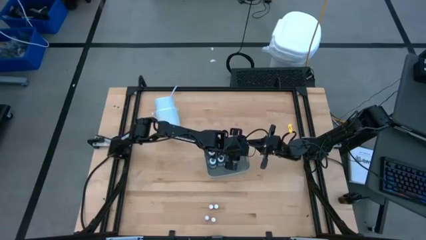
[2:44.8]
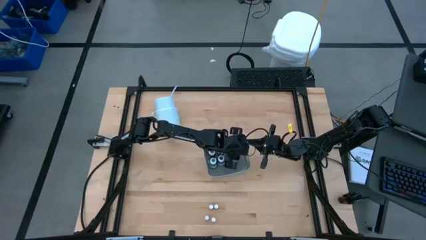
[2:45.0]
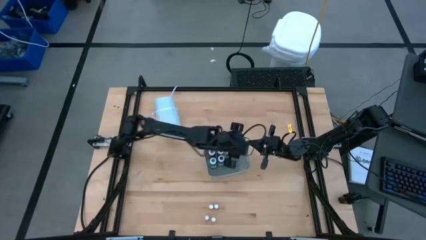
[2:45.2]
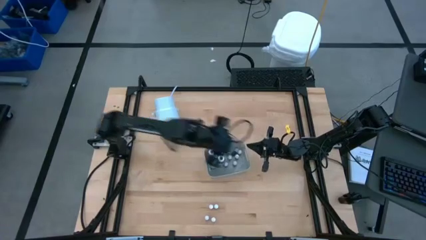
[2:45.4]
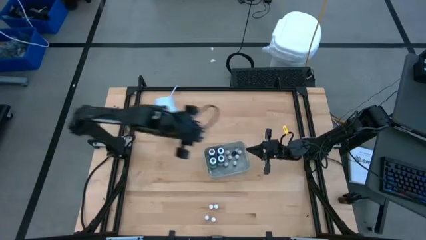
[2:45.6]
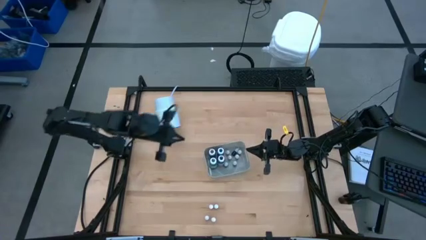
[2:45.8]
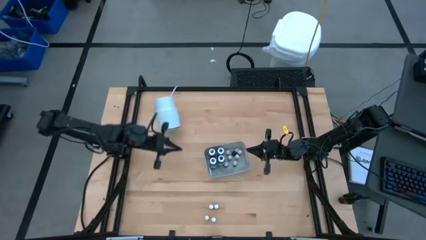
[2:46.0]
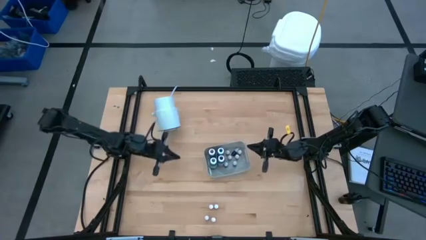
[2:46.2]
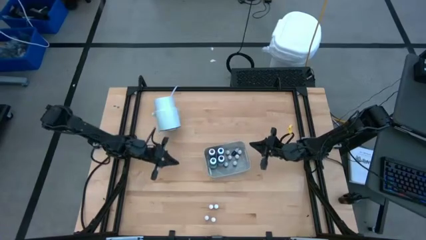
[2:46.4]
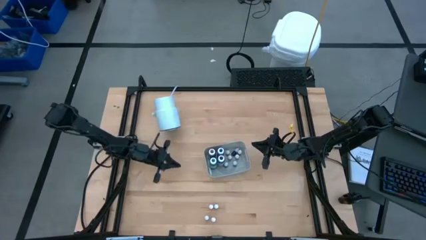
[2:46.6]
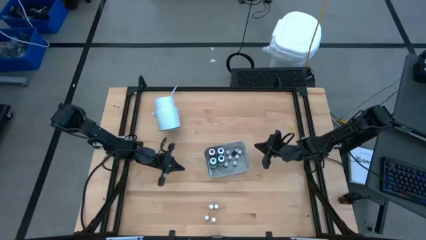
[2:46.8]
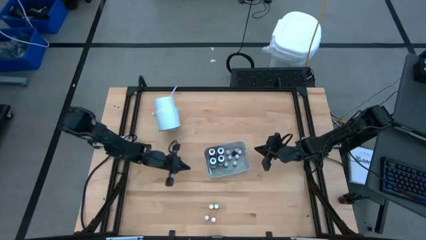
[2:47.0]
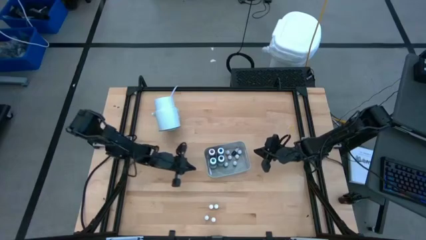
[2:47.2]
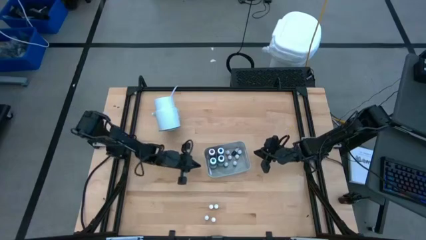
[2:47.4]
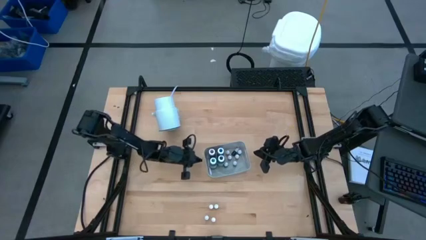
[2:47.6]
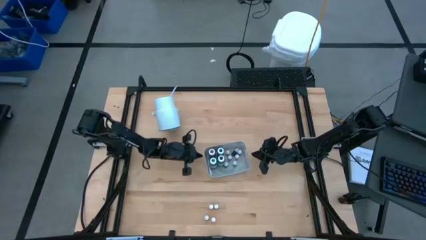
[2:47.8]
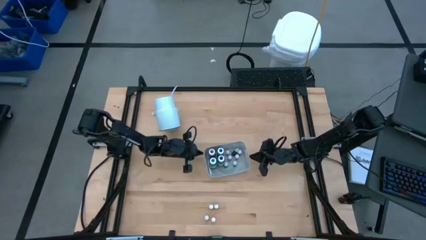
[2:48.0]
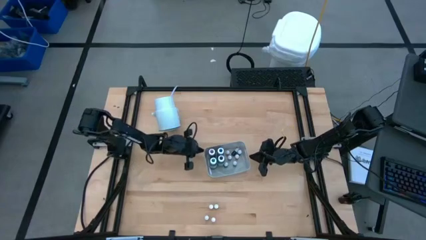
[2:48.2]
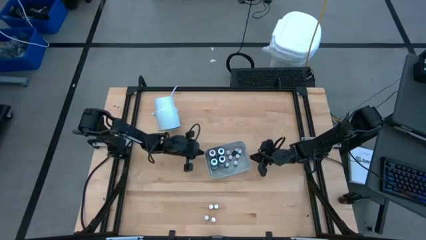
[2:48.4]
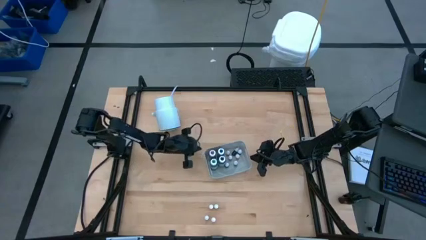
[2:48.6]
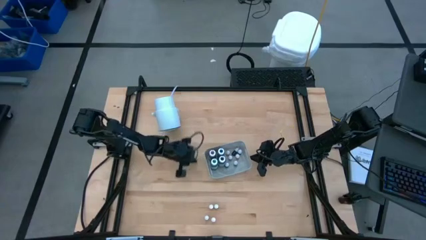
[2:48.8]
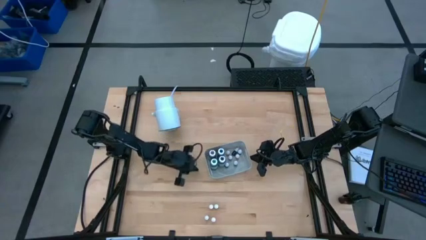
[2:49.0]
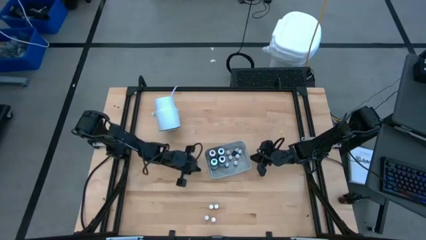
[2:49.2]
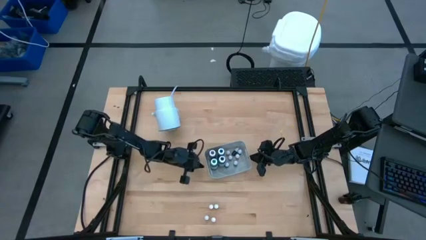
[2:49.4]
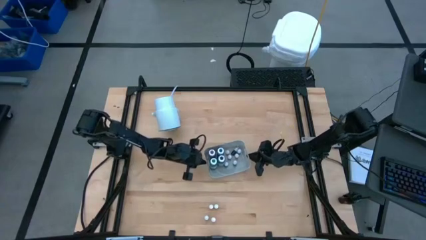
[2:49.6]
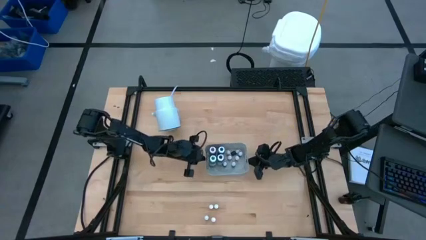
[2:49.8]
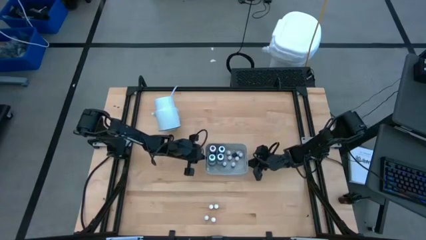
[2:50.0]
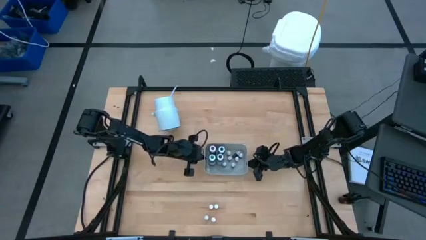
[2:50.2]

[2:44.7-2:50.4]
Task: Pick & Place food coloring
Adjust the bin on the table

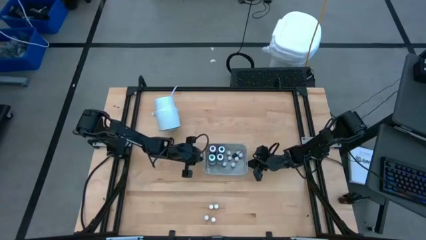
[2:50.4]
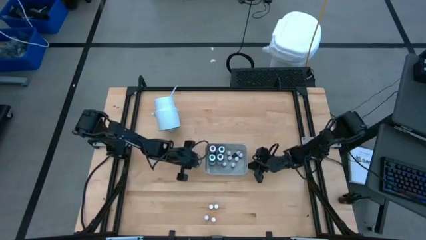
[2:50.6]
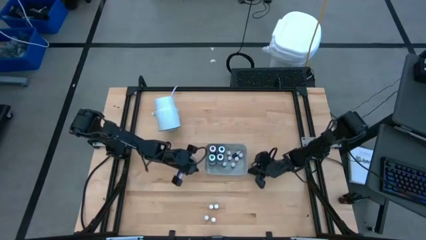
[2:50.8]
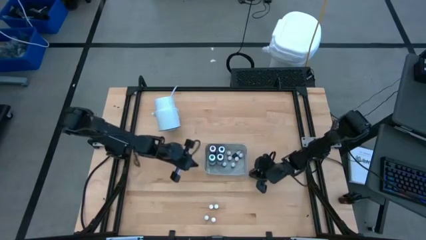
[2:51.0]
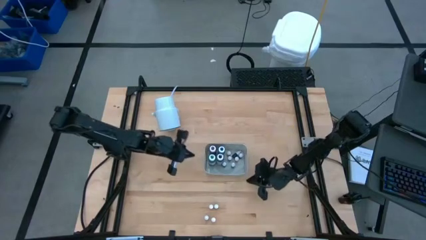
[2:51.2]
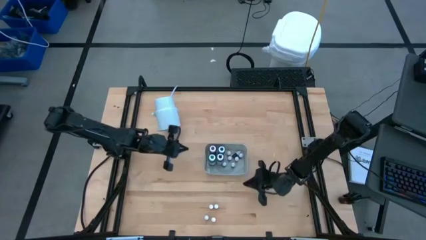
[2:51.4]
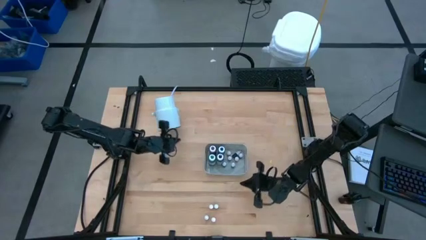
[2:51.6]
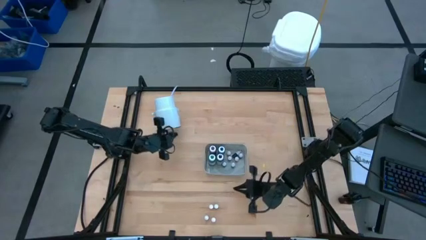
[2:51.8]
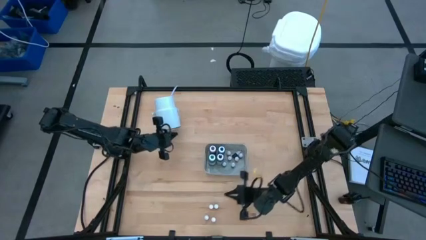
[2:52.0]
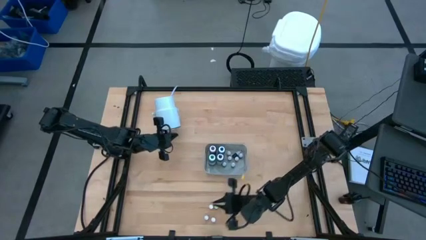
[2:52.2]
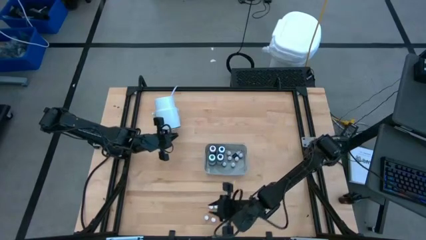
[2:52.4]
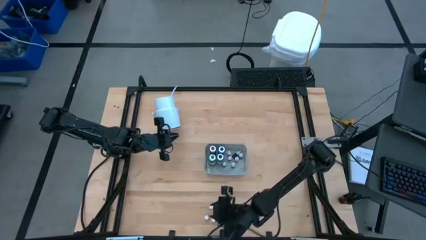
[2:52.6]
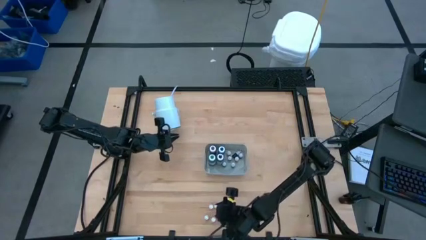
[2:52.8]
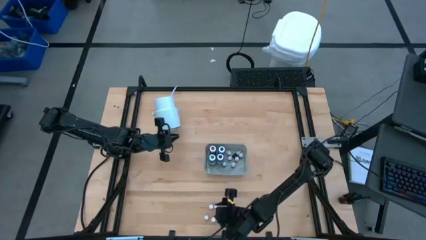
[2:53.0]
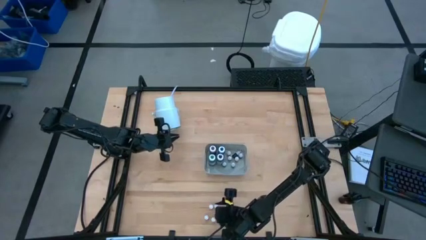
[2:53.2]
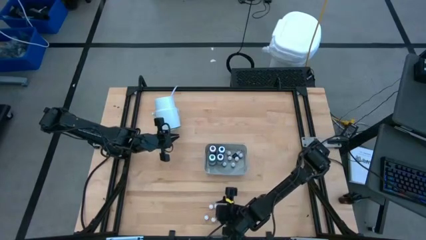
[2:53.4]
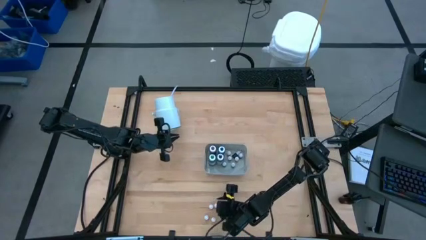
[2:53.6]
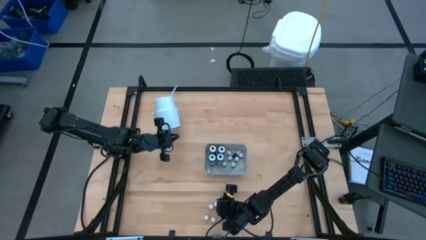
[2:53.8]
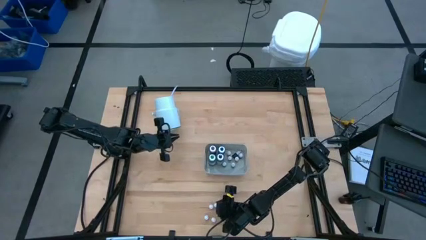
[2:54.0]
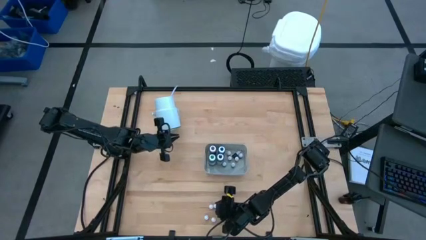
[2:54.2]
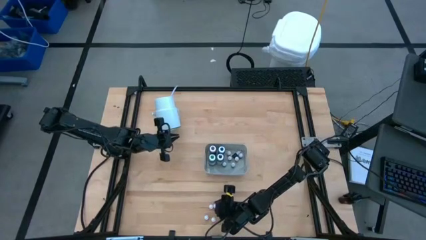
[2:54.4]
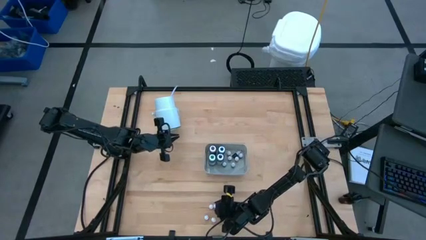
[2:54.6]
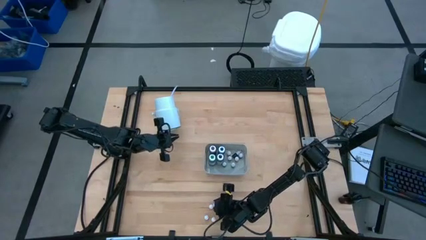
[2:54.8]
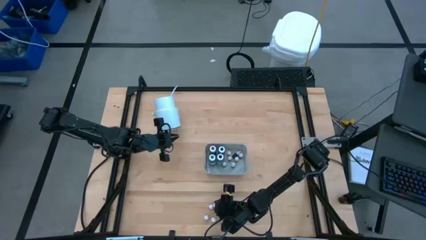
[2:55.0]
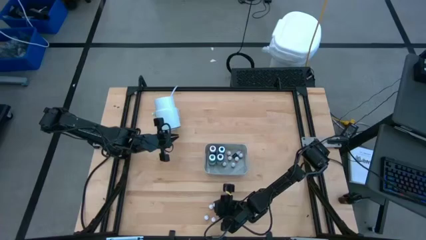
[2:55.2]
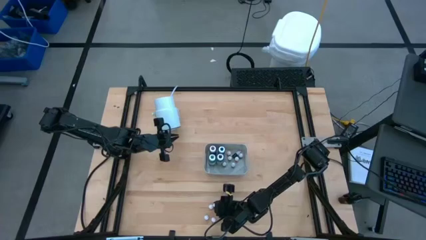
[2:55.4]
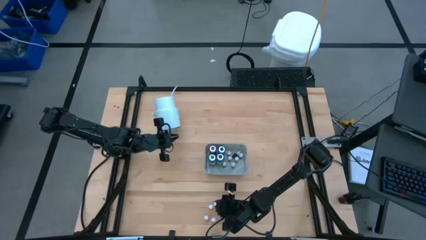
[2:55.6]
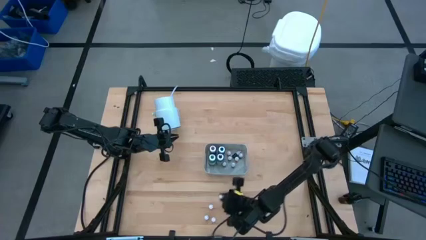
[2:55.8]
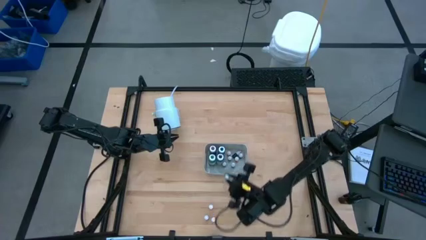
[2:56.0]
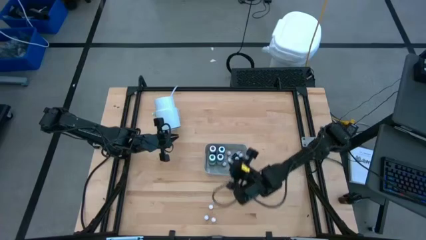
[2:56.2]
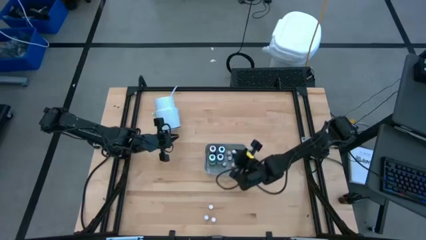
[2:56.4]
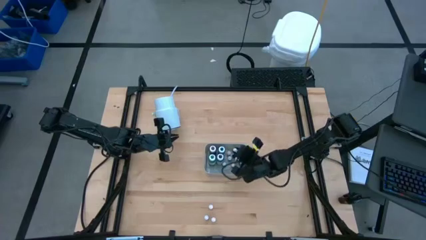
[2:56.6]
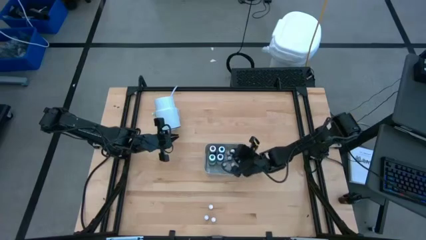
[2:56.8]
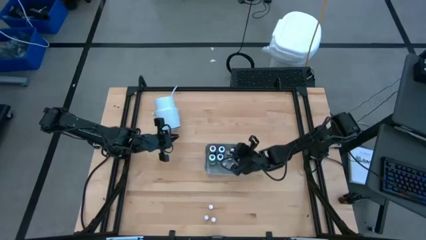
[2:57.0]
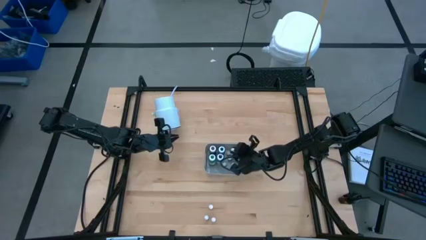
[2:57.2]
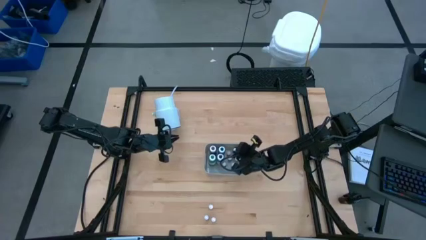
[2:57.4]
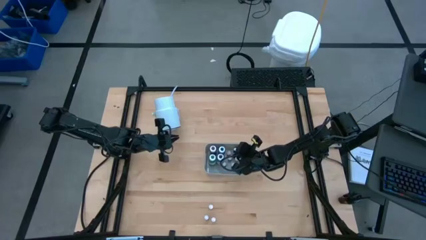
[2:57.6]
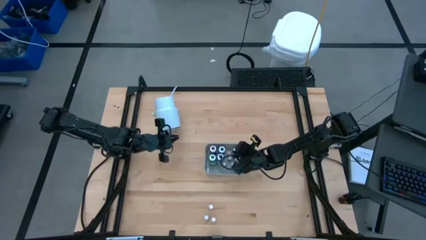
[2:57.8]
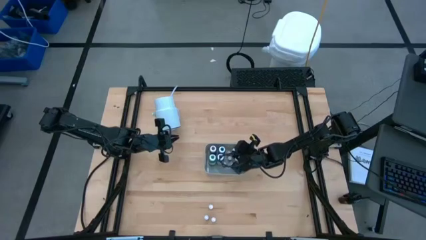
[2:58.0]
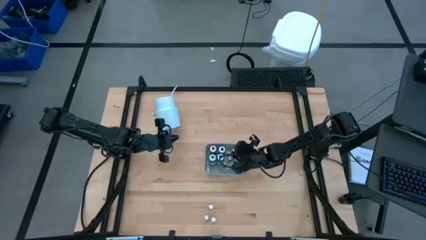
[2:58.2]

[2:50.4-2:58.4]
Put the top small red food coloring bottle into the bin

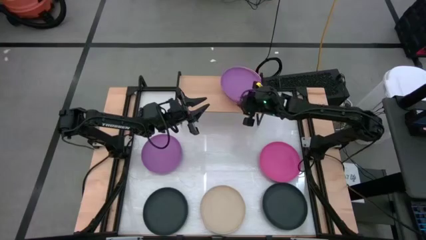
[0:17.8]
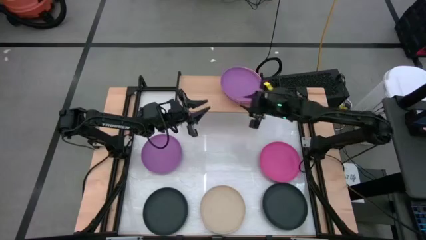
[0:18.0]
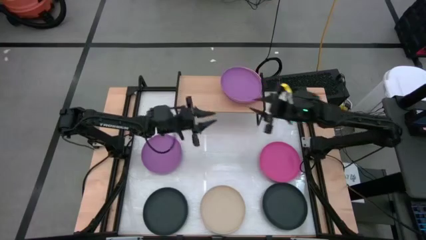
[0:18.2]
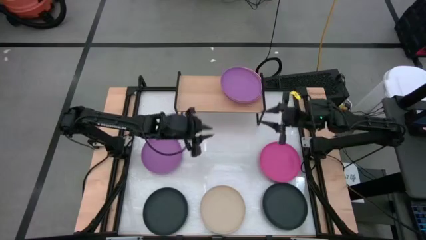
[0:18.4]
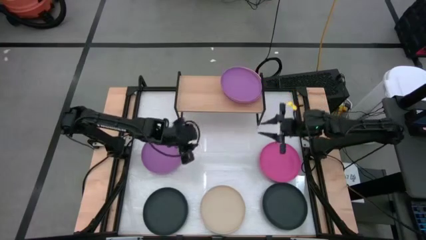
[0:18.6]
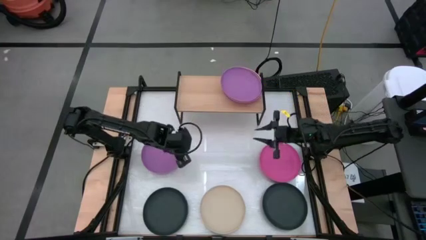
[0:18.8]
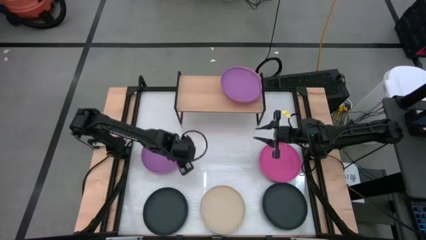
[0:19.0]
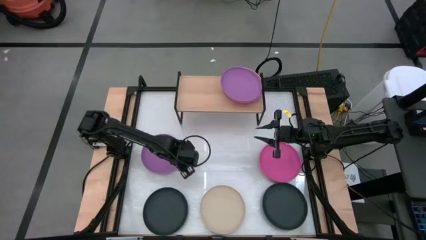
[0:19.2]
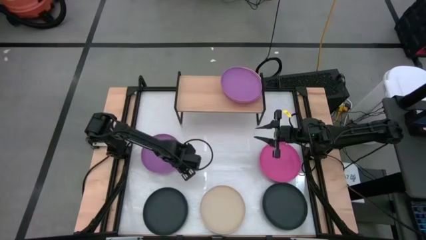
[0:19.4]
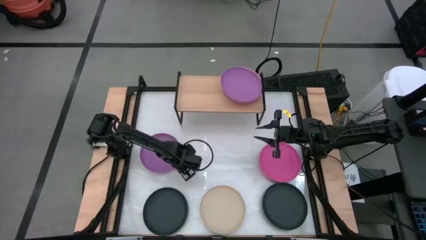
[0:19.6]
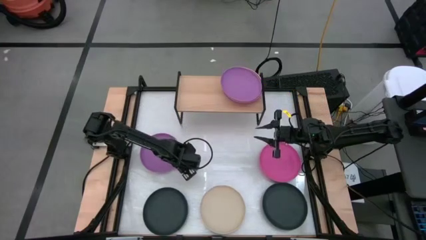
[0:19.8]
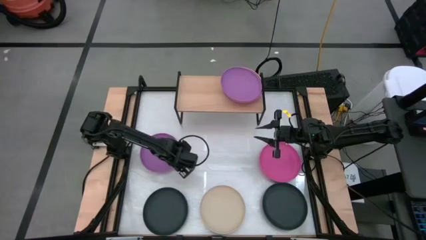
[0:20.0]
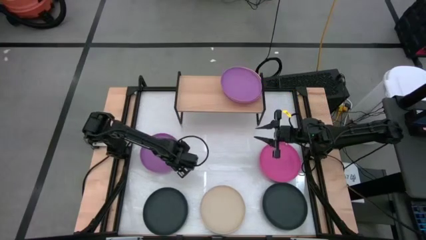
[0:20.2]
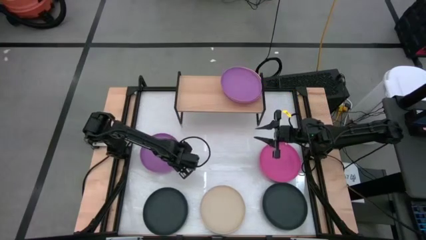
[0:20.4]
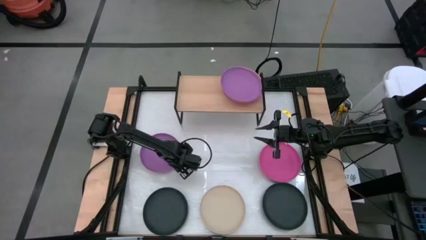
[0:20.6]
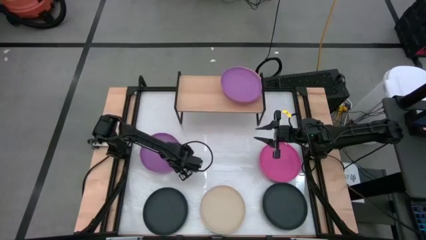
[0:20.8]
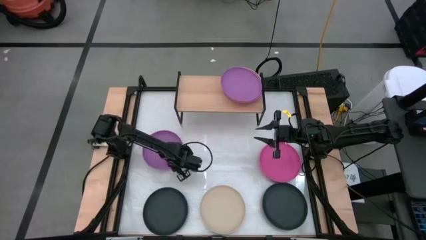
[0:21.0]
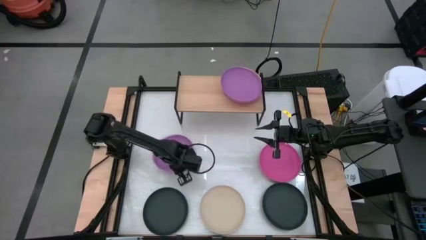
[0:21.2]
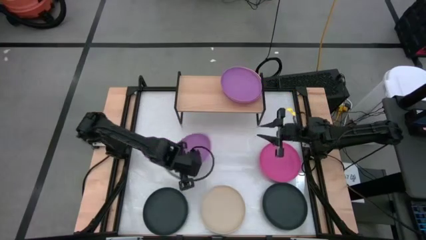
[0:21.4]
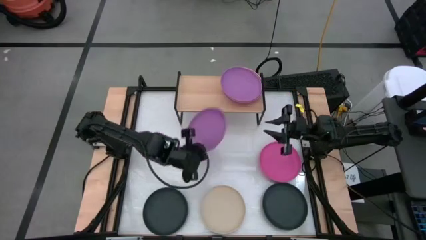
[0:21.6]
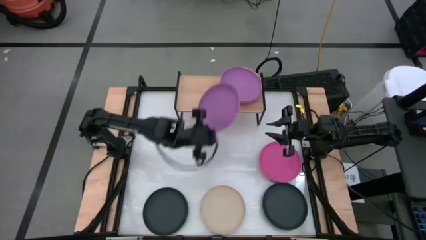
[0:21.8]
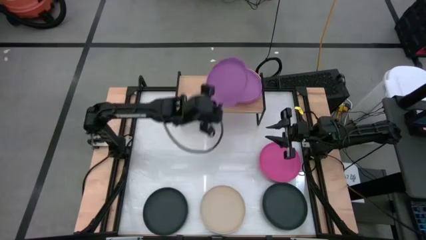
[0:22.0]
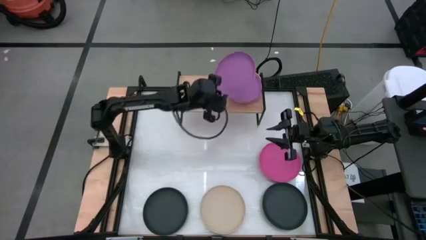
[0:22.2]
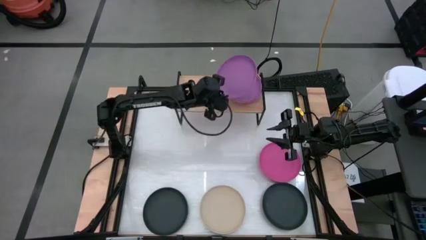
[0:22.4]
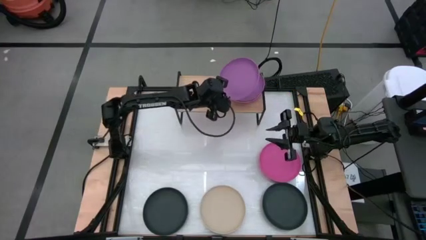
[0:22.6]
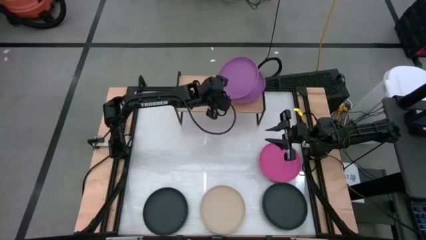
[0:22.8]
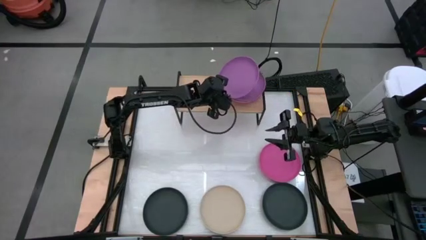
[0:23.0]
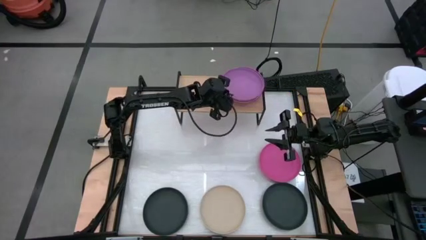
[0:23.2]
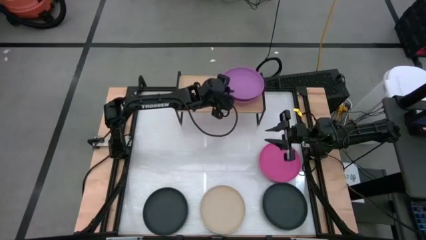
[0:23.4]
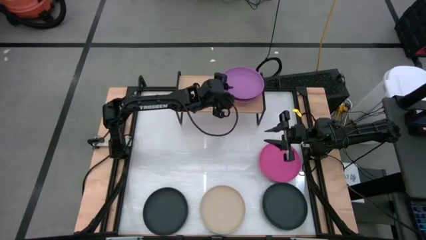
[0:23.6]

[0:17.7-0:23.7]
Task: Place and stack plates onto a shelf
Stack the purple plate on top of the purple plate on the shelf
